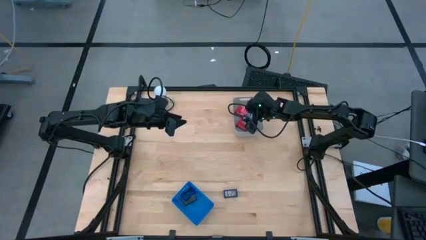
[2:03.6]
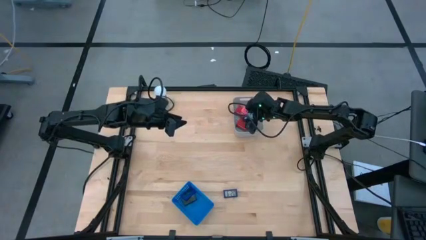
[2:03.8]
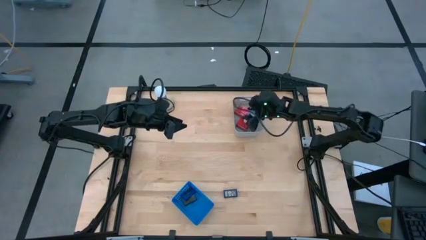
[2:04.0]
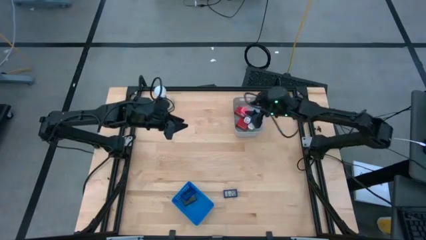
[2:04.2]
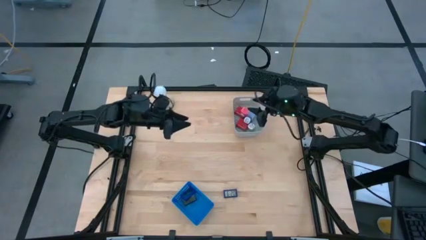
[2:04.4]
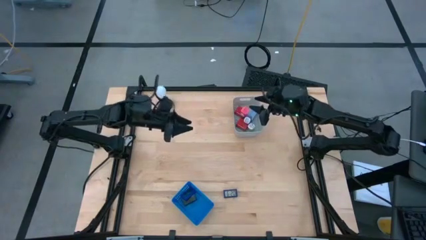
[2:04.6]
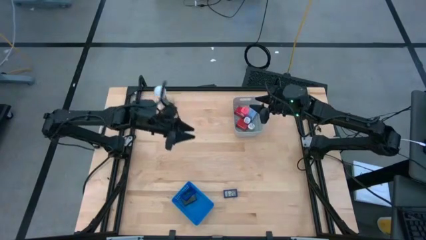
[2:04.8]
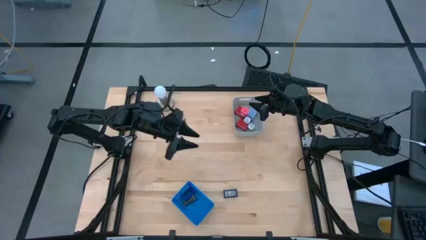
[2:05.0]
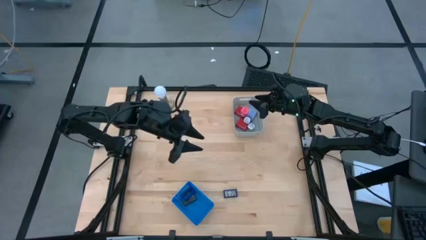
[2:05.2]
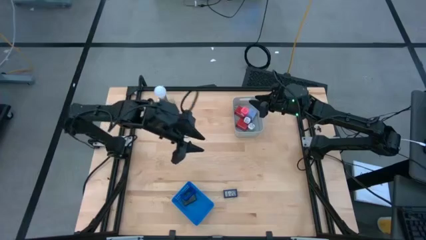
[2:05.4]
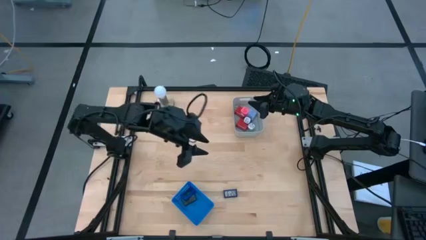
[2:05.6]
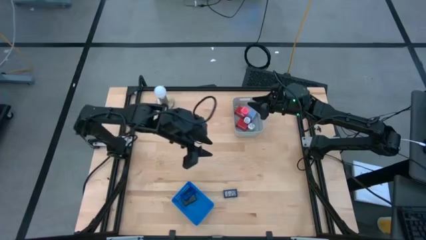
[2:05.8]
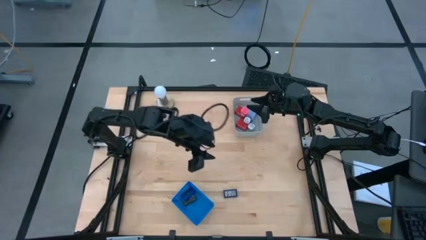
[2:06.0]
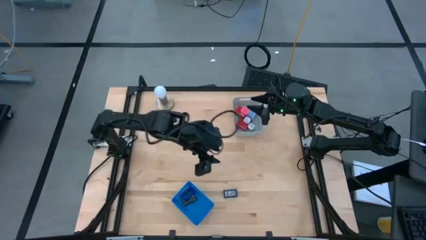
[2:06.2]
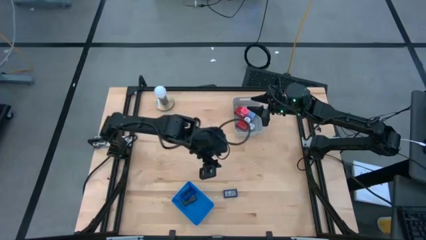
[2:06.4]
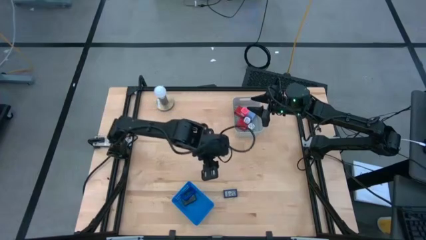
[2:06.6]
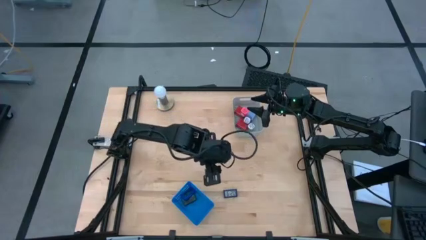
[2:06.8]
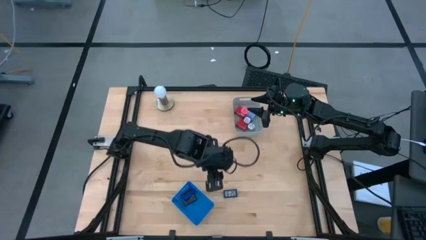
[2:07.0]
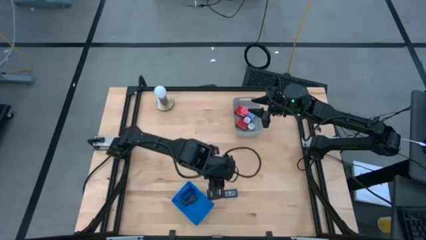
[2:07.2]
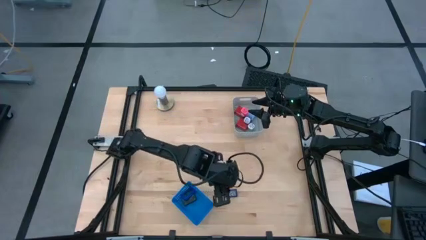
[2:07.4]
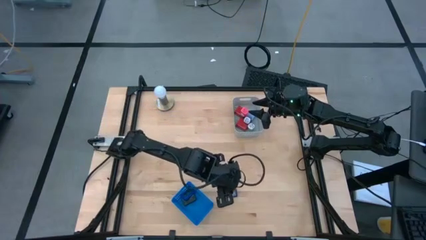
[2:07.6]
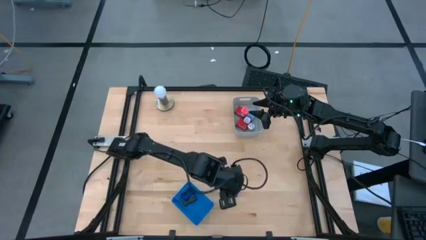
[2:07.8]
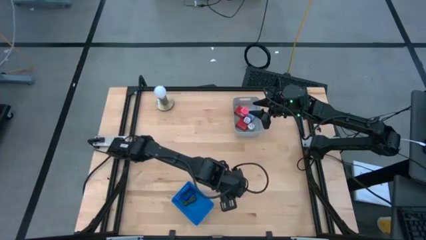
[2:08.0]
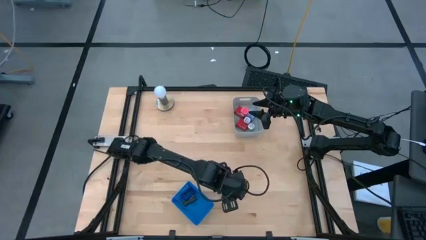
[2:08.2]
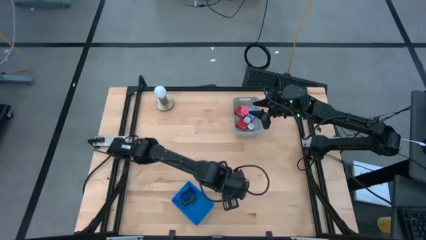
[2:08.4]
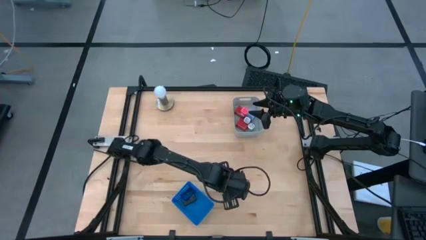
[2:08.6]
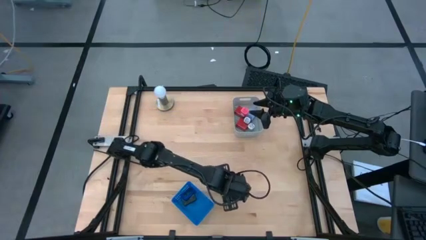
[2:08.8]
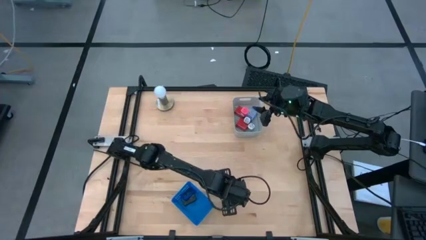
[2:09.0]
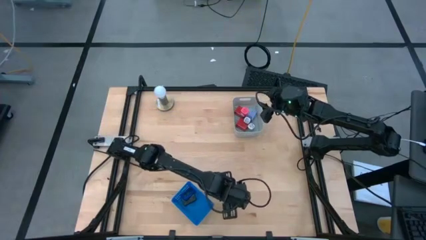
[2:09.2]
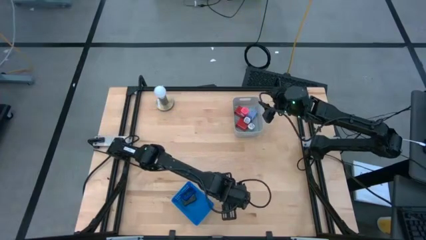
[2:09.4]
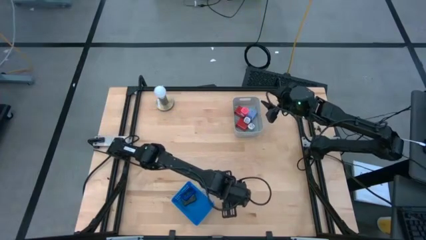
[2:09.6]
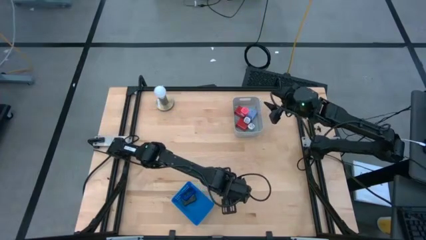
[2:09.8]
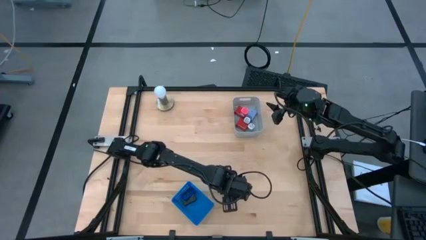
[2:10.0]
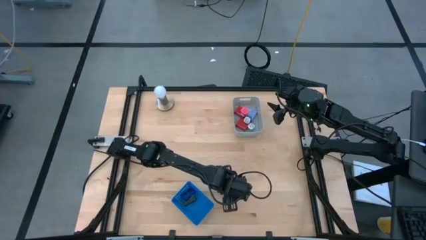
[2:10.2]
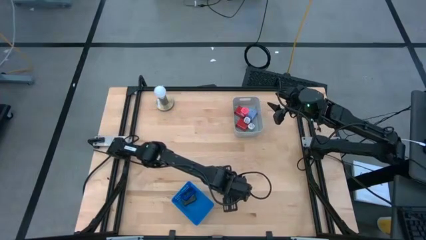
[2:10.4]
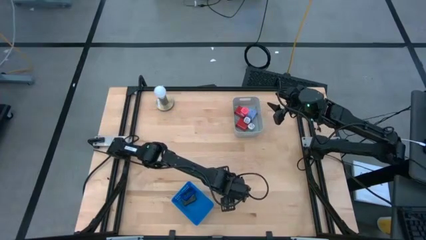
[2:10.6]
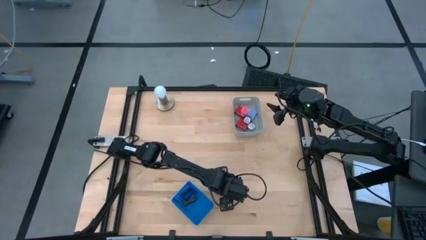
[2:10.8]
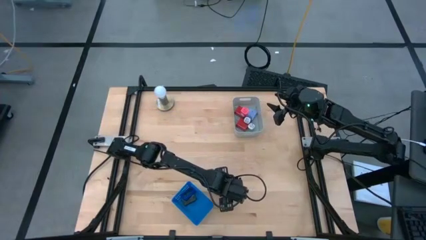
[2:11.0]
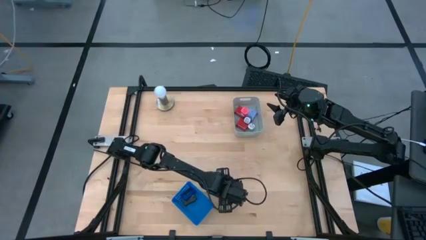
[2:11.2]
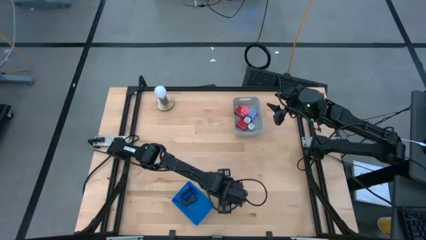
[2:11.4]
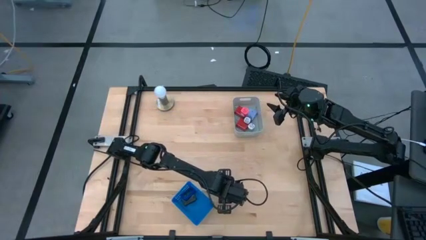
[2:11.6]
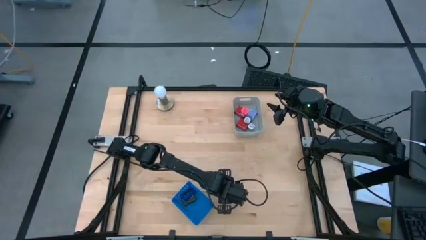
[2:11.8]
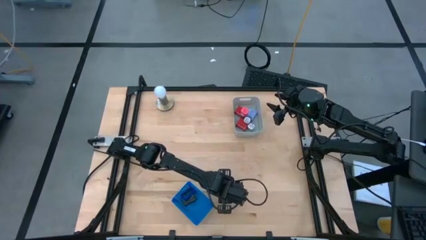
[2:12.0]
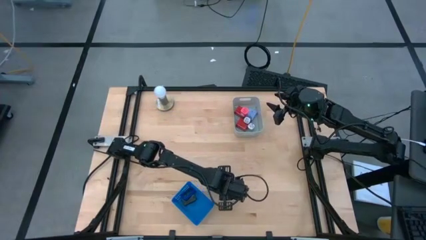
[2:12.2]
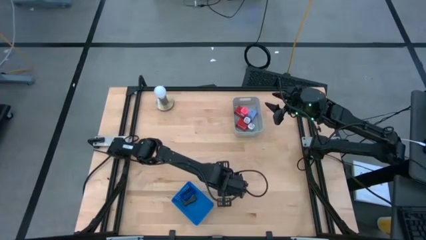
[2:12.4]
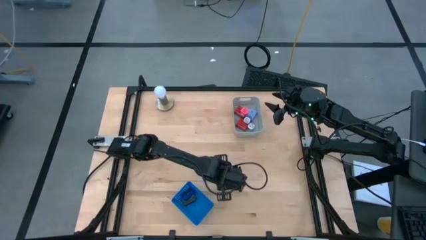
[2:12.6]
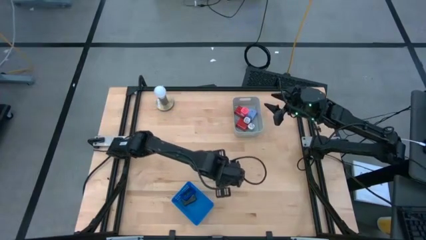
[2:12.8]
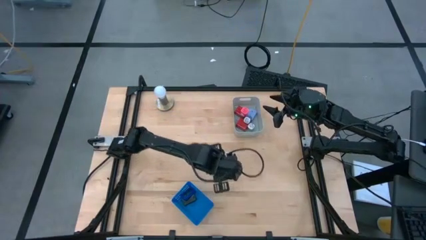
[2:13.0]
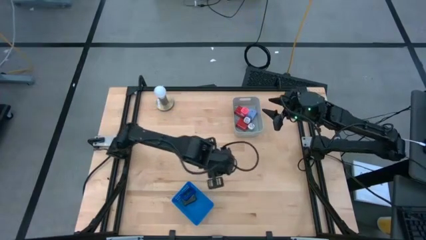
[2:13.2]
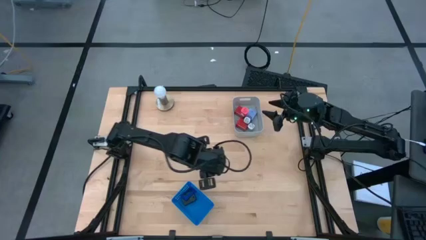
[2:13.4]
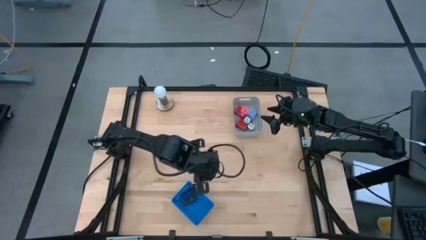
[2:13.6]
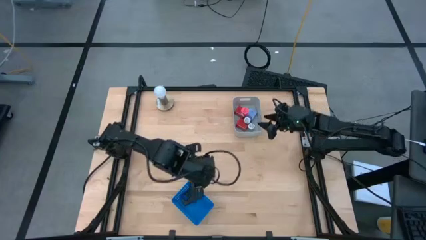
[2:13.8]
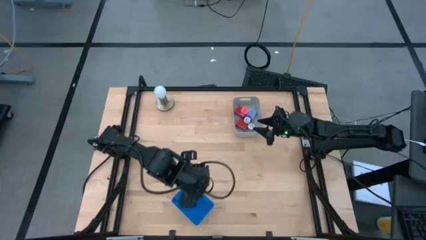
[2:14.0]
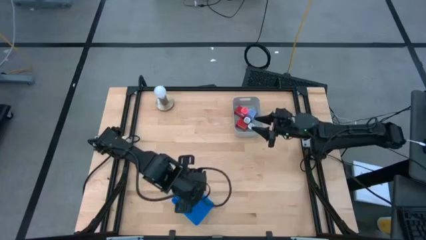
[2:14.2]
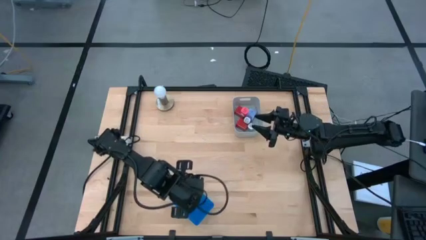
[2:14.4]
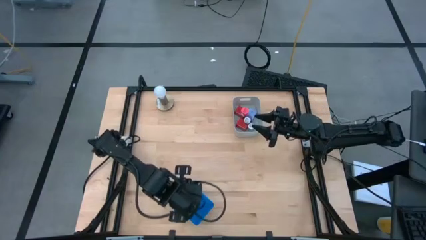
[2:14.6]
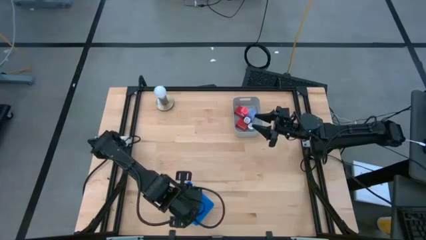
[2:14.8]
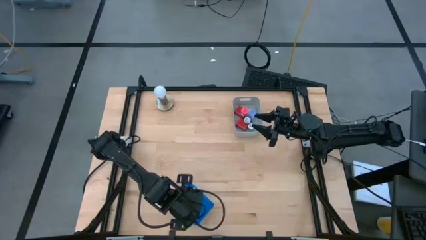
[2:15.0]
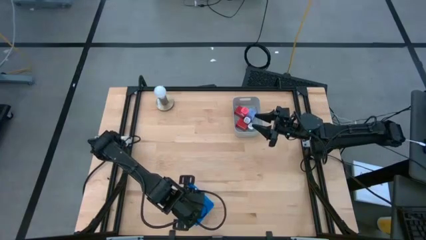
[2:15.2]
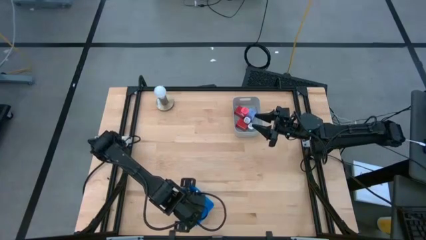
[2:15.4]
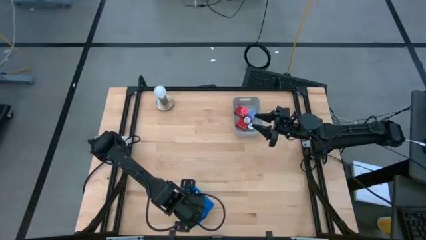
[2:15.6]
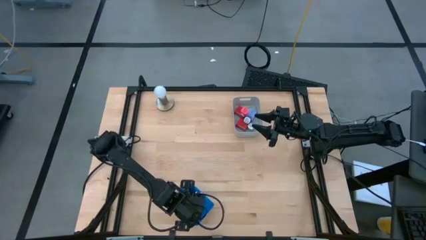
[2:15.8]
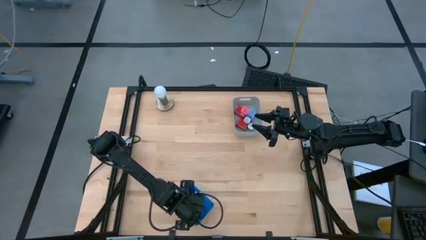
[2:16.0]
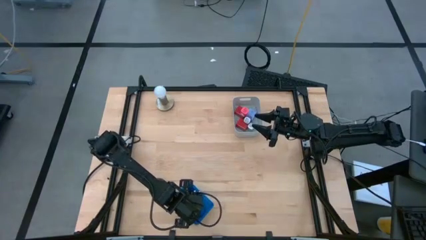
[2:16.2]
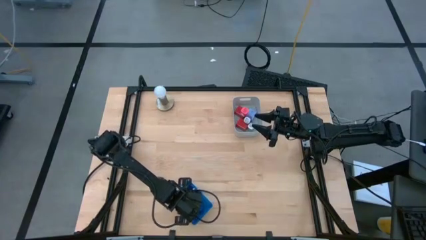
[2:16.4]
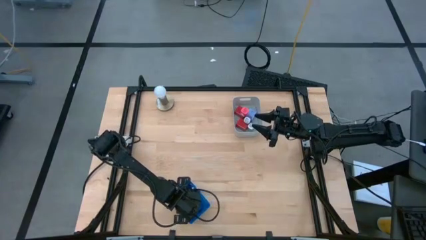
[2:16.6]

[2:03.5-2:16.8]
Task: Pick & Place Office items
Put the blue digital timer into the blue bin

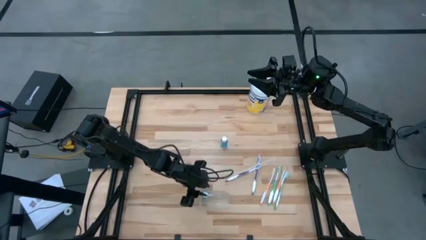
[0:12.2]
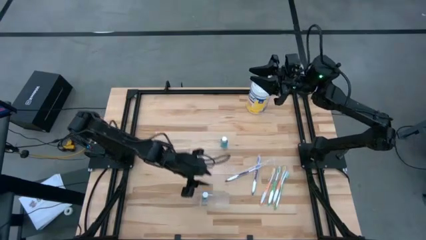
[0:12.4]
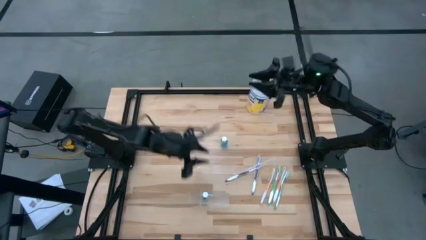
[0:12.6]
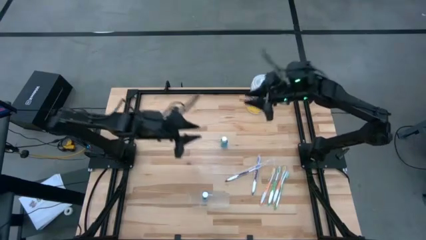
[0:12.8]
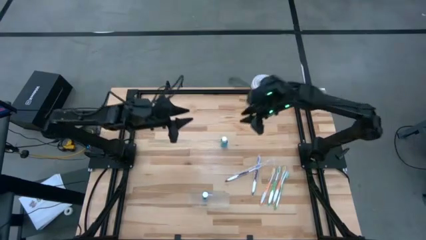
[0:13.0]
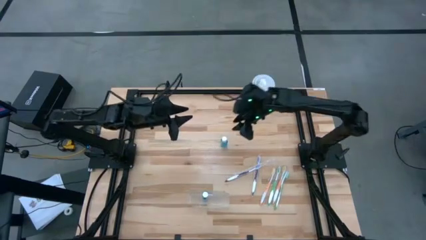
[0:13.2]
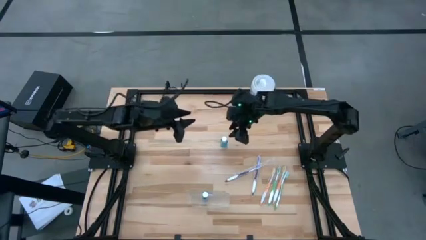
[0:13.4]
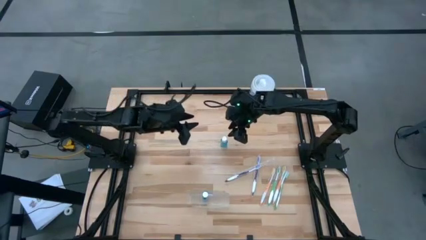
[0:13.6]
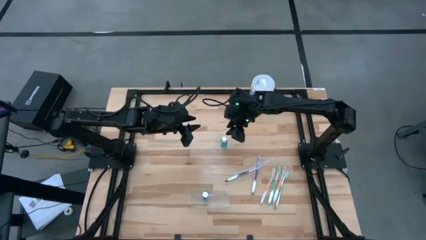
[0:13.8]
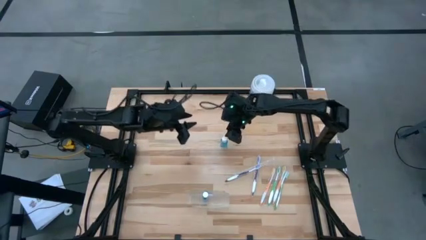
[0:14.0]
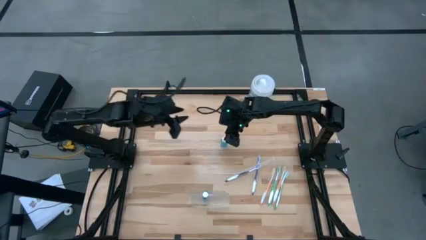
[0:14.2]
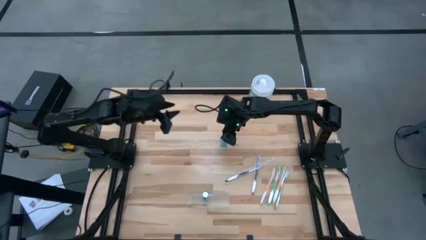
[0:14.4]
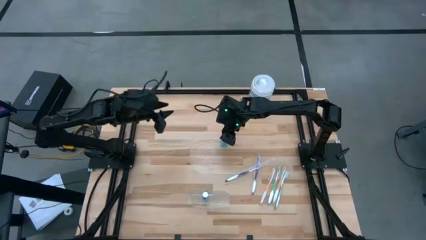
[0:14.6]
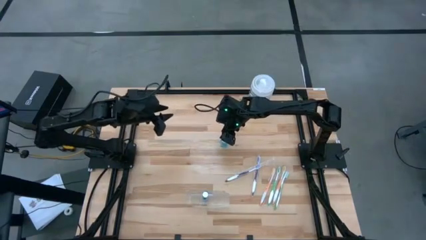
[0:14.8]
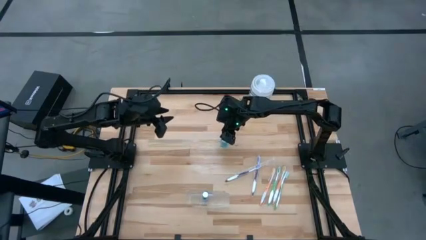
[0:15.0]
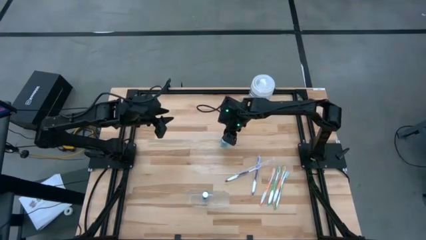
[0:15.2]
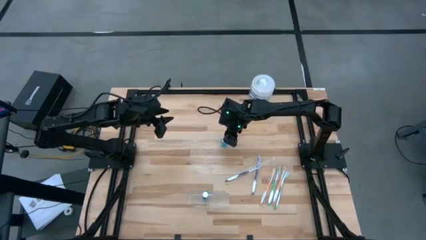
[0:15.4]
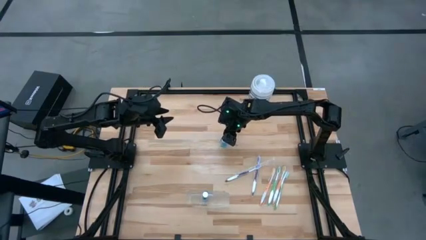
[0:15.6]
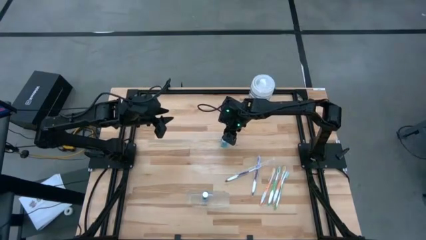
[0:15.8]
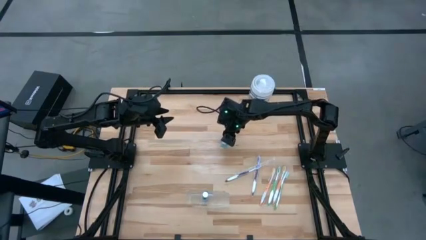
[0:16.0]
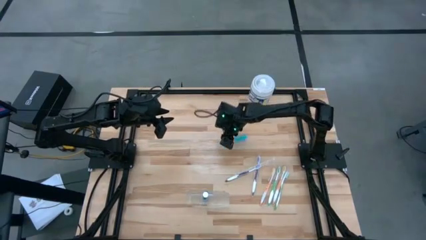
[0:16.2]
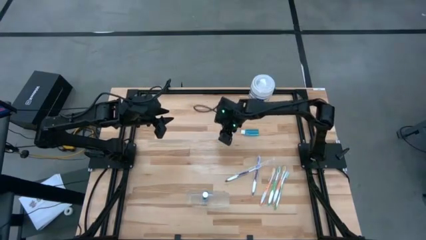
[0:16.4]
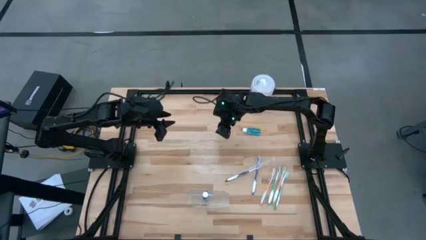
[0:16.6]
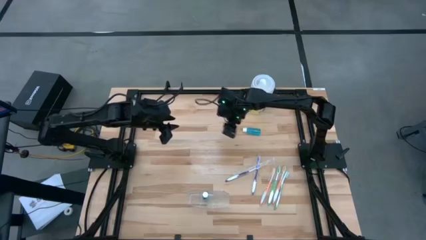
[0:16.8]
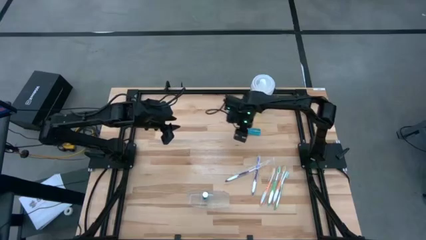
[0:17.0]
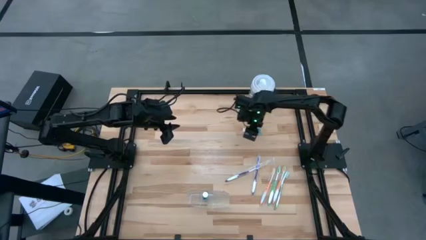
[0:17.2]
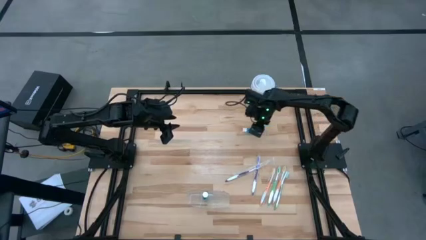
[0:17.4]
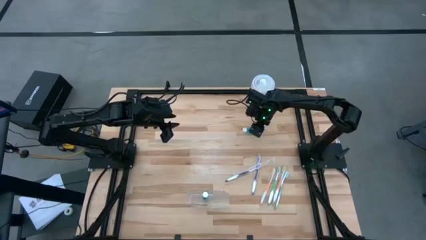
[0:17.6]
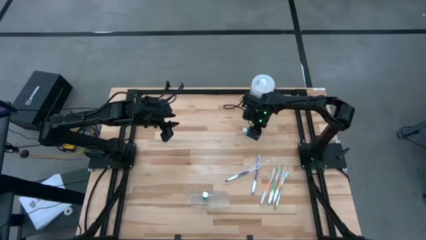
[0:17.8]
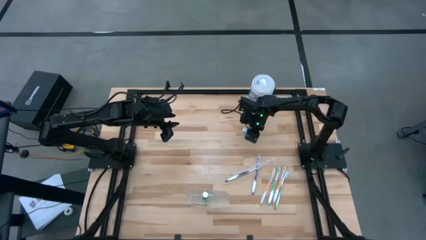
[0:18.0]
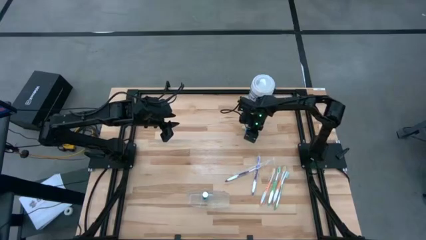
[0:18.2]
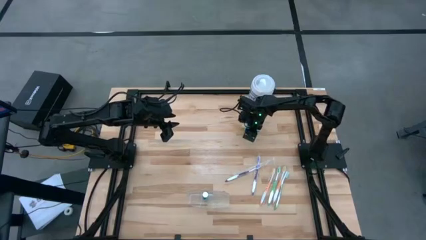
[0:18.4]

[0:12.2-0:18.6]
Task: Pick & Place toothbrushing station
Put the mouthwash into the transparent organizer
